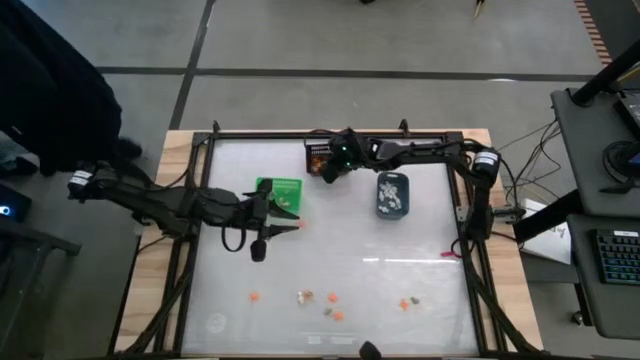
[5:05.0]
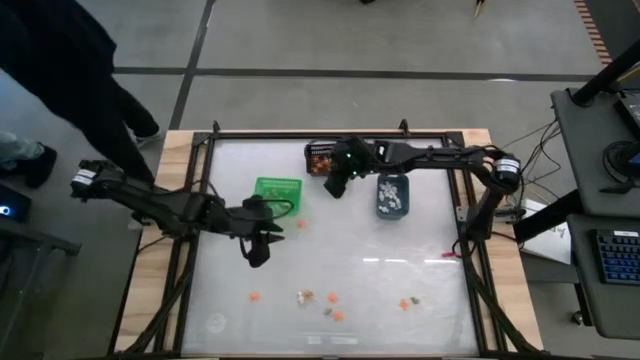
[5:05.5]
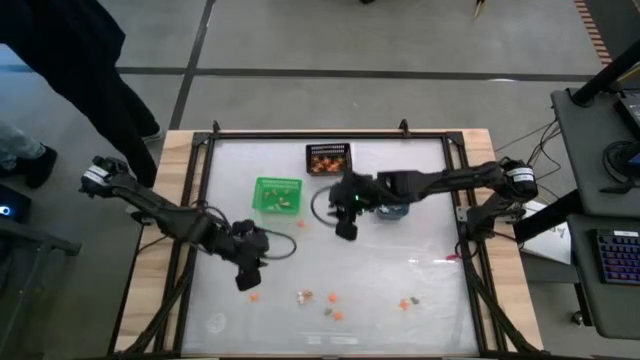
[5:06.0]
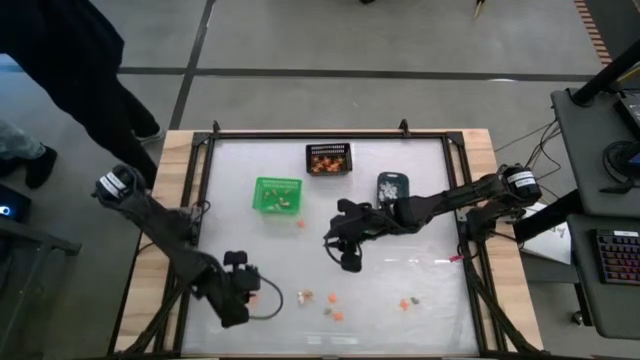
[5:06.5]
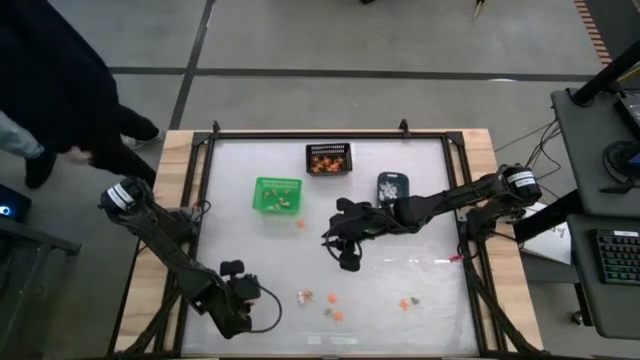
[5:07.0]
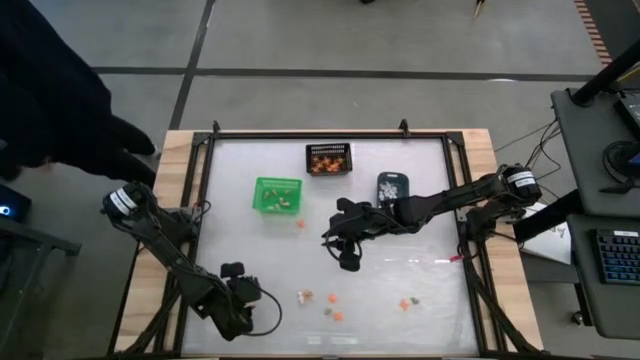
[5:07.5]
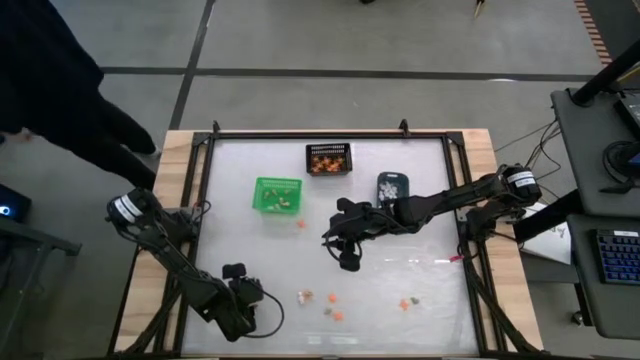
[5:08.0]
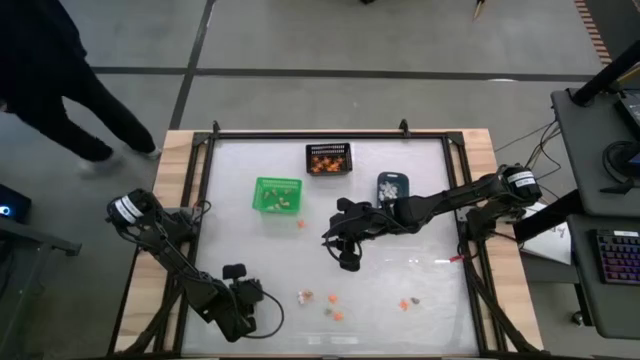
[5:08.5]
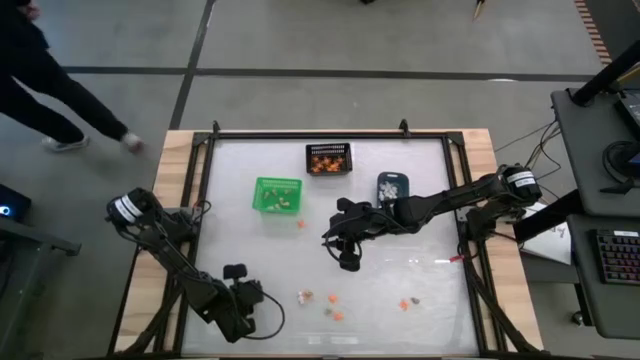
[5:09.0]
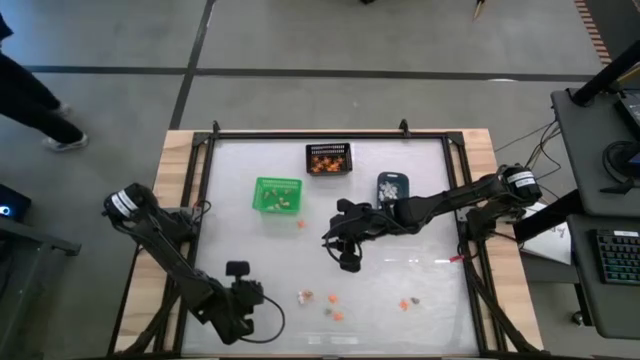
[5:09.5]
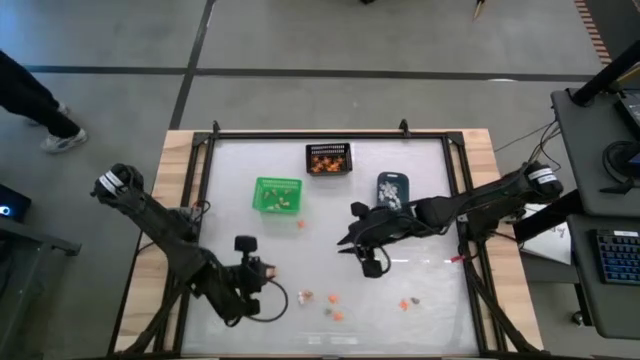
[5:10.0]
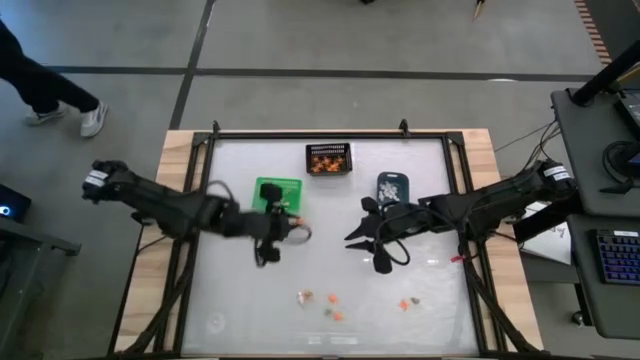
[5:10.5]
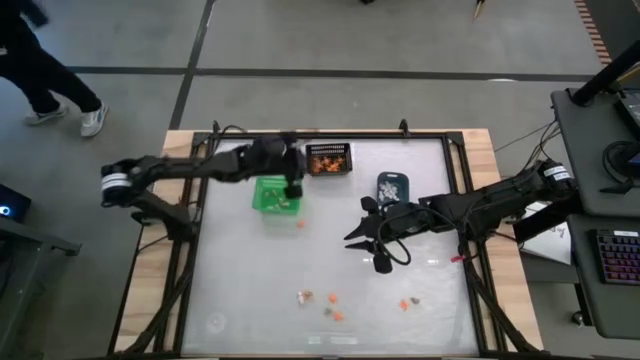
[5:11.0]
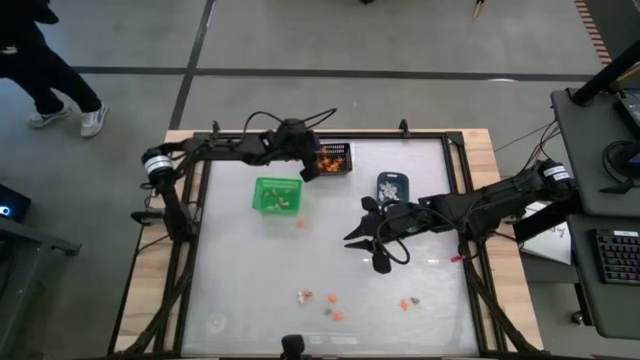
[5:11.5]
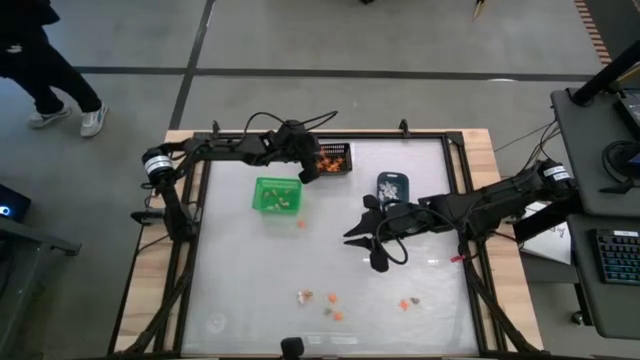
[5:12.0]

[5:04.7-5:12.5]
Task: Sort Halloween decoration
Put the orange spider toy into the black bin

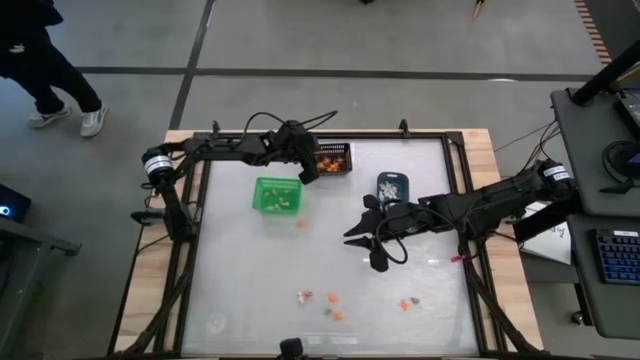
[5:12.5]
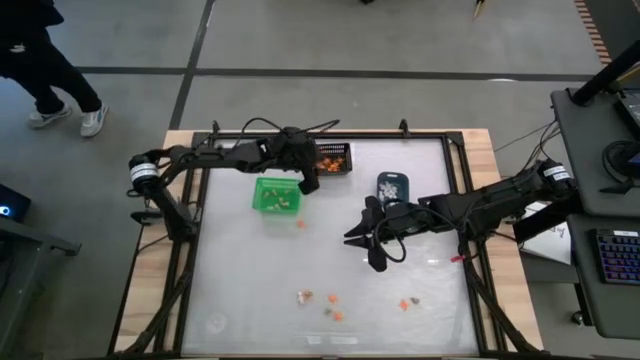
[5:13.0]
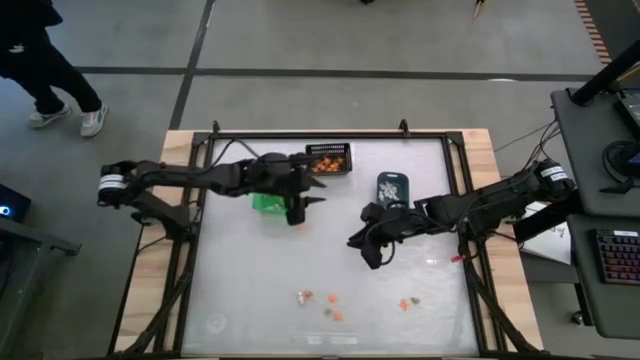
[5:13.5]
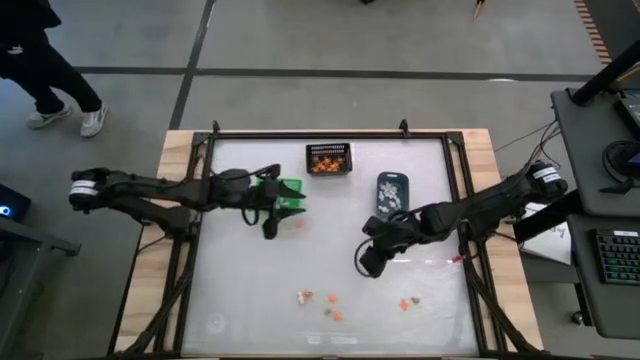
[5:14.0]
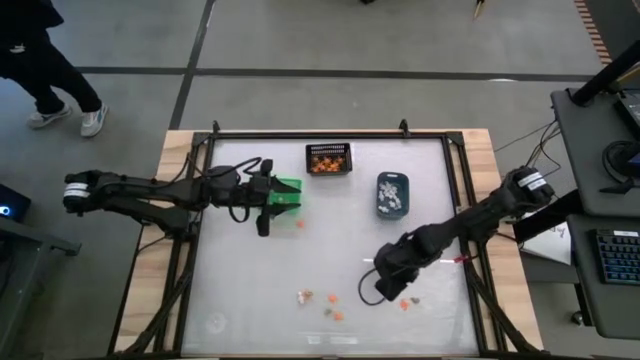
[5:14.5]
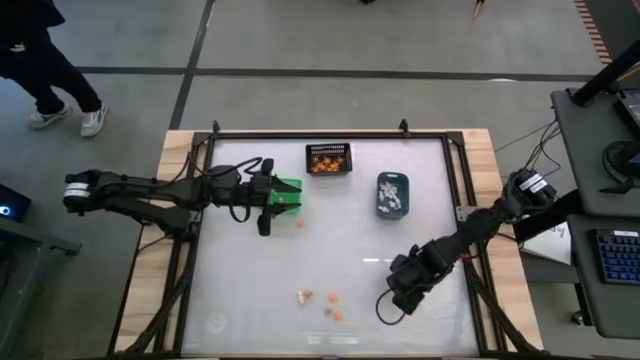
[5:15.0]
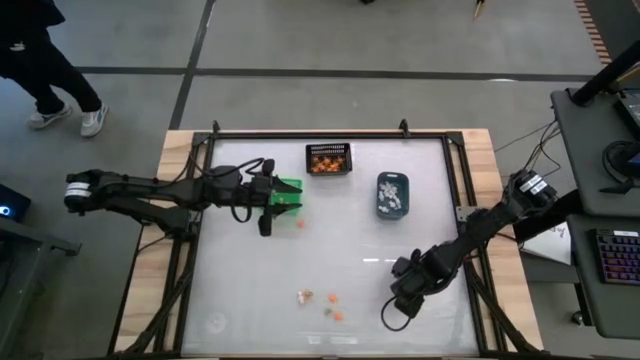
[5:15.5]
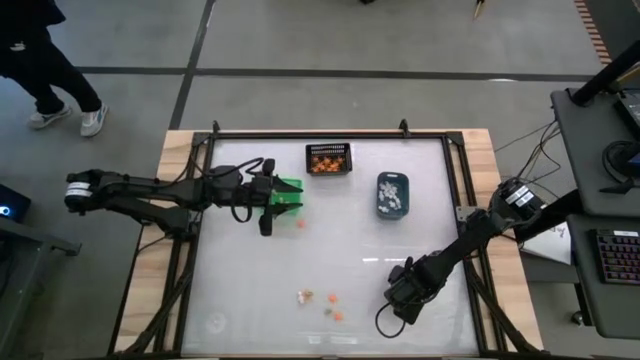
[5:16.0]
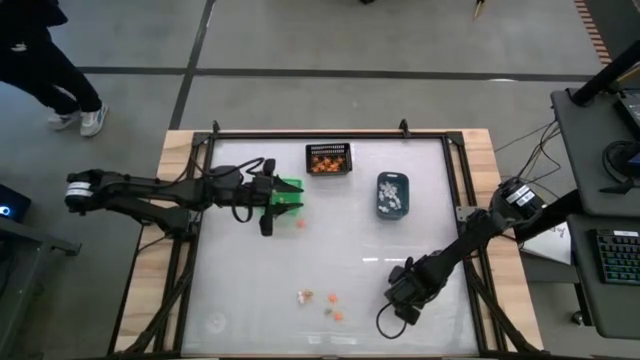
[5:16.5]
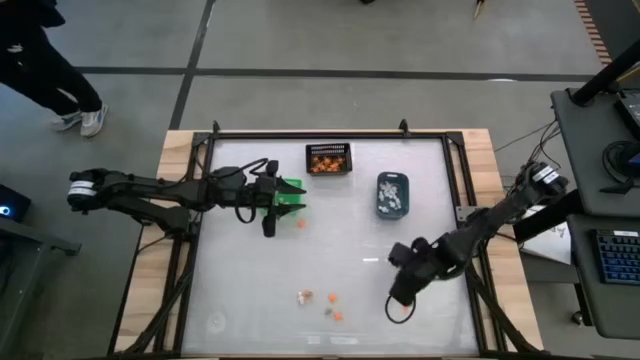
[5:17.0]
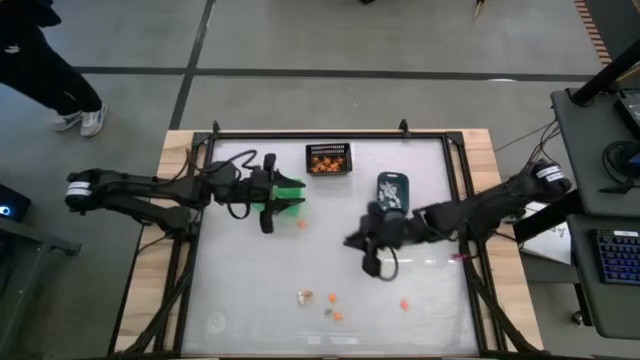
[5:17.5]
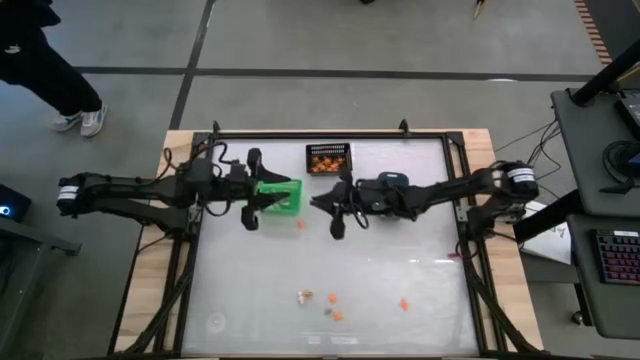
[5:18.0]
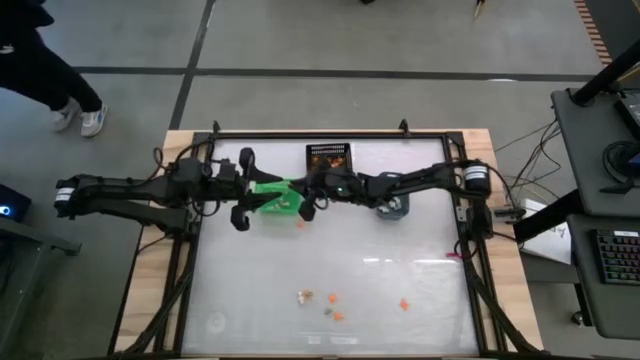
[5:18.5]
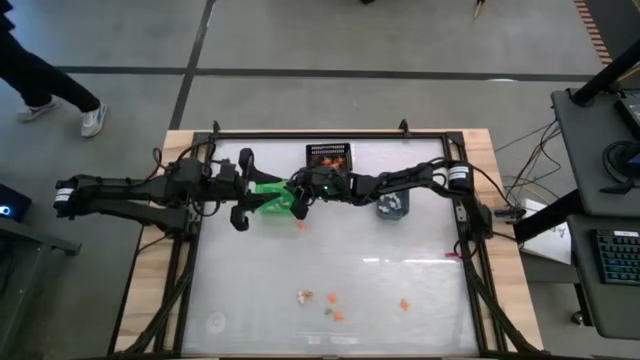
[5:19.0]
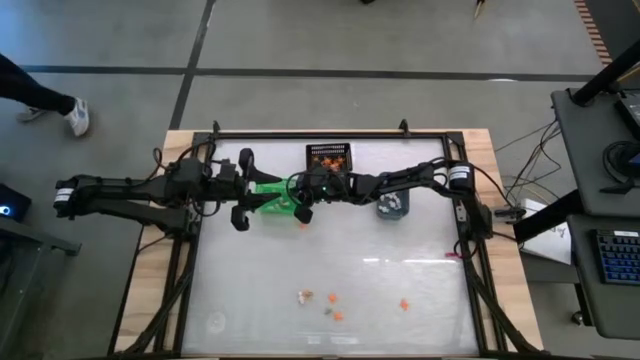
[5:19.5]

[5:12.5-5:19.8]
Put the gray skull toy into the green bin

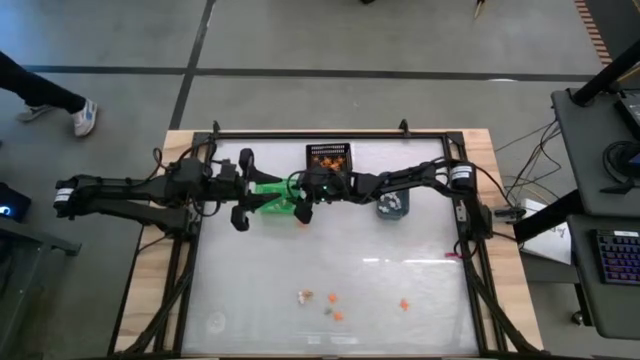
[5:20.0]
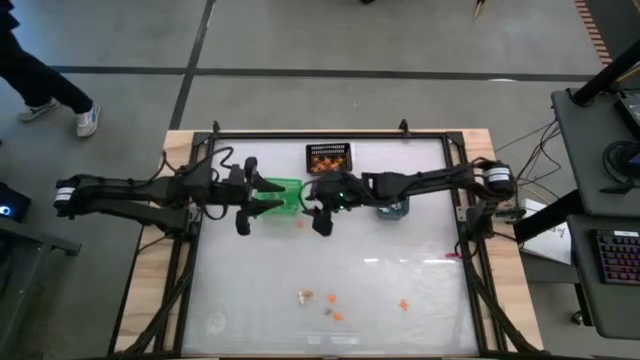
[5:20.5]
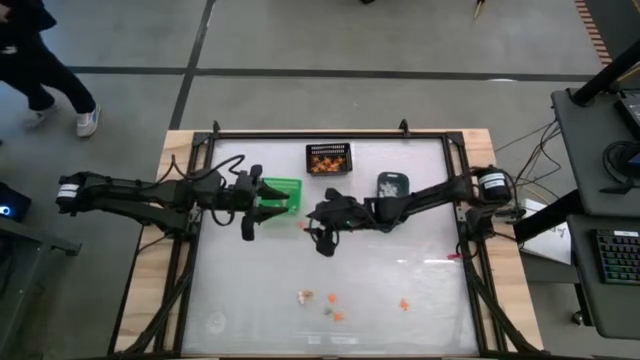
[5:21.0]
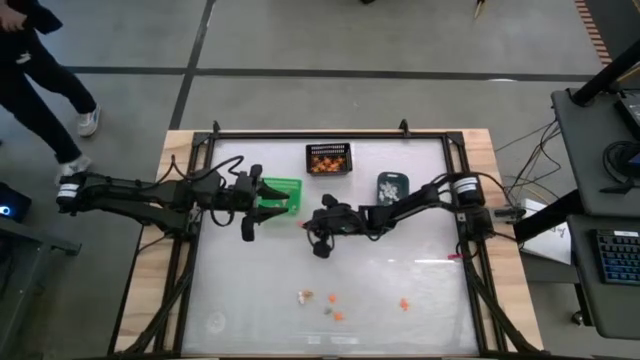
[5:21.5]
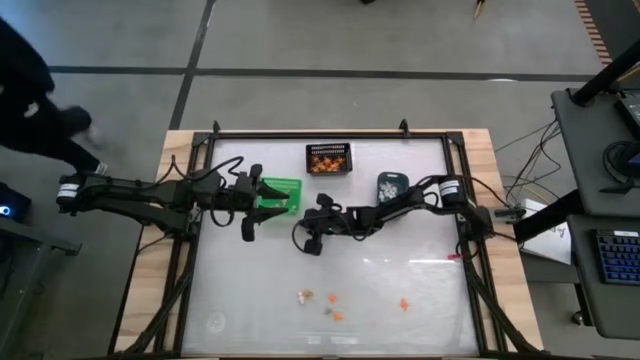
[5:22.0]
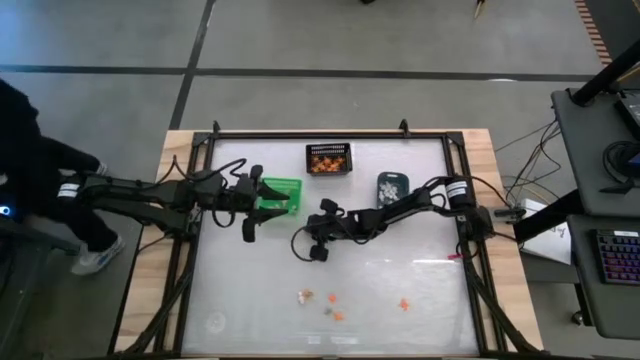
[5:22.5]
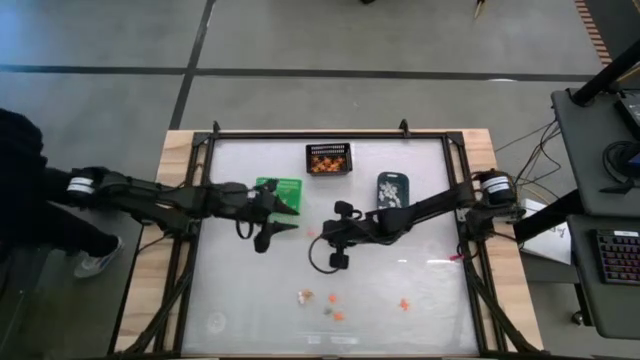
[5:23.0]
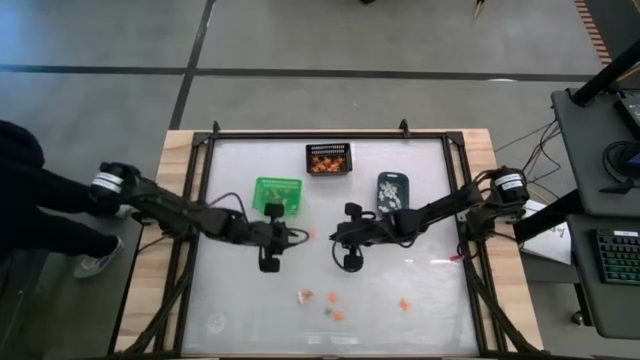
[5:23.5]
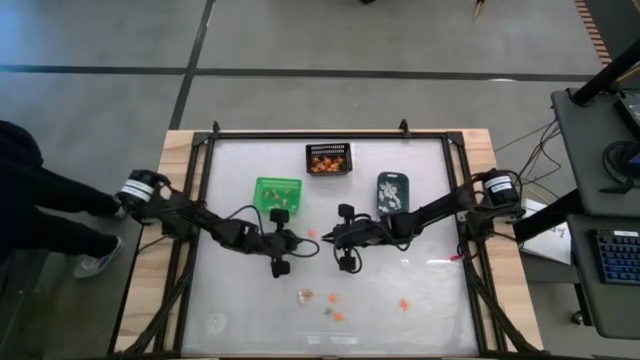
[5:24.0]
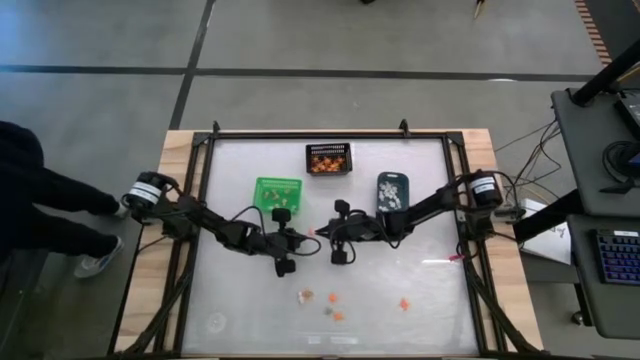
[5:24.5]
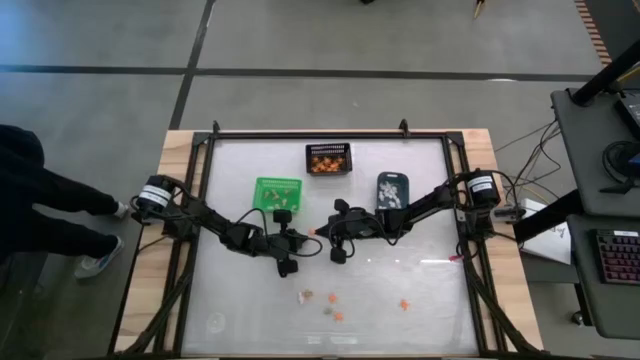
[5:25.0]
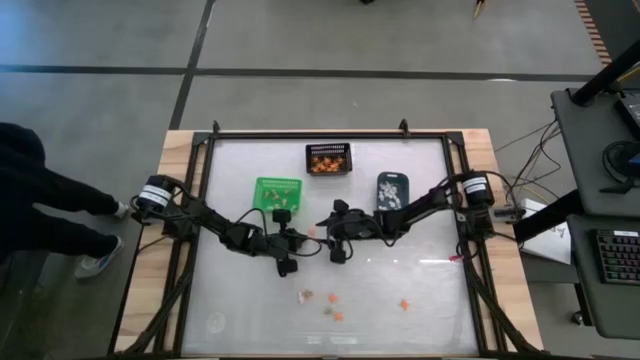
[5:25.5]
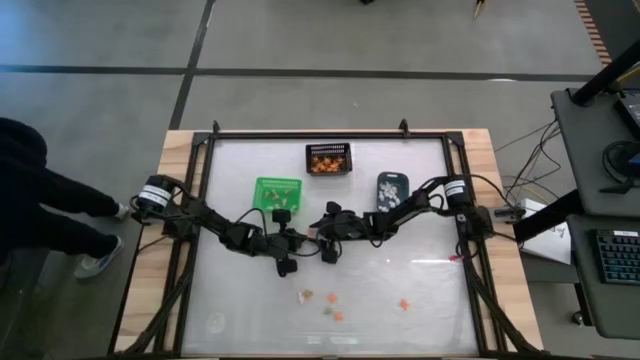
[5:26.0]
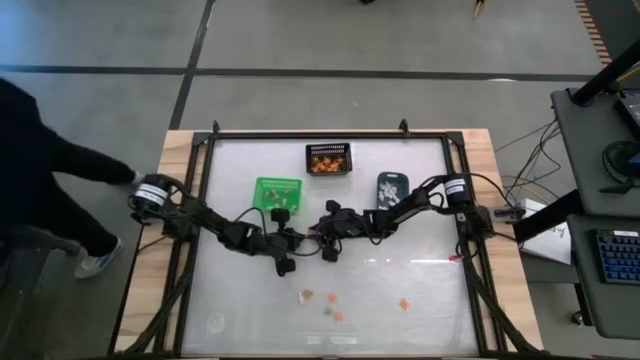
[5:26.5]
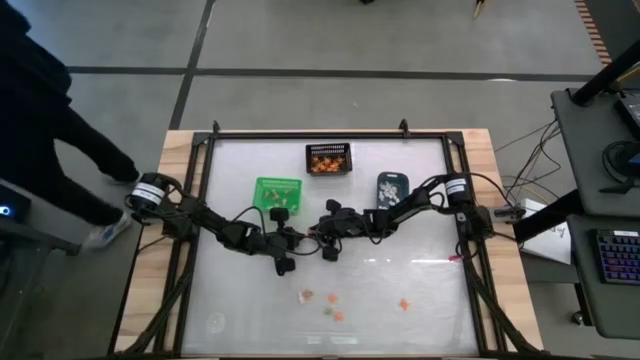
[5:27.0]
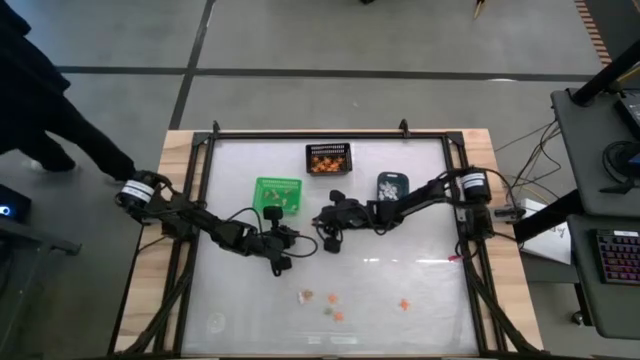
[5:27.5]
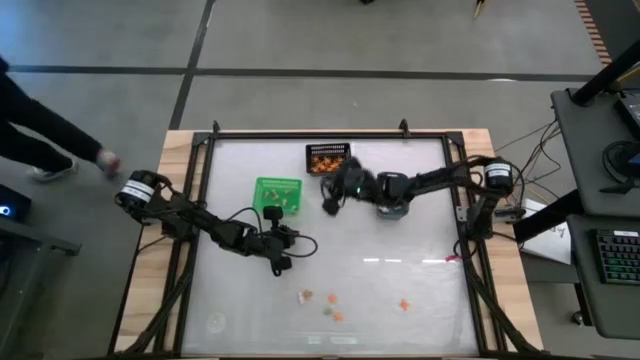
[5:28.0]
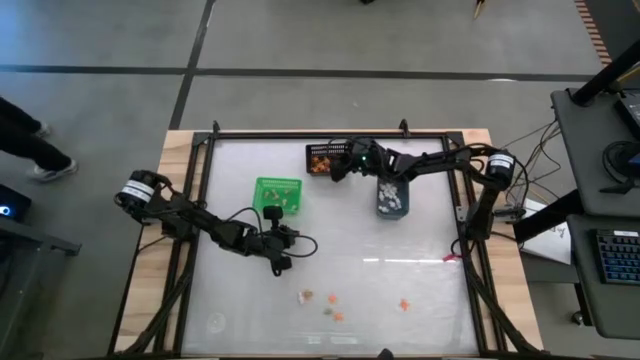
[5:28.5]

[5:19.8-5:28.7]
Put the orange spider toy into the black bin
